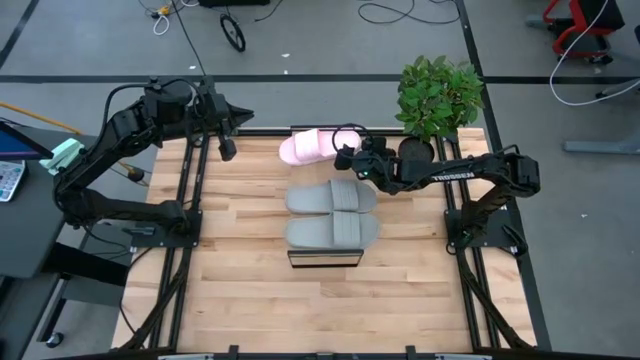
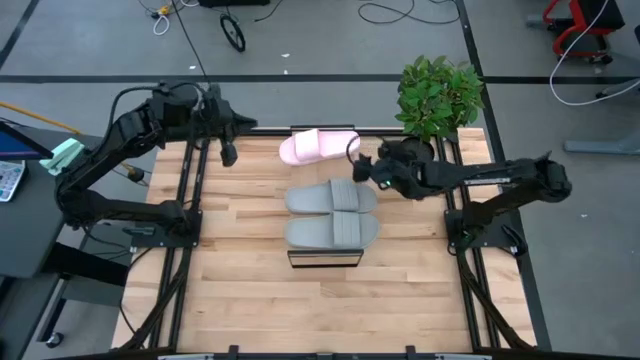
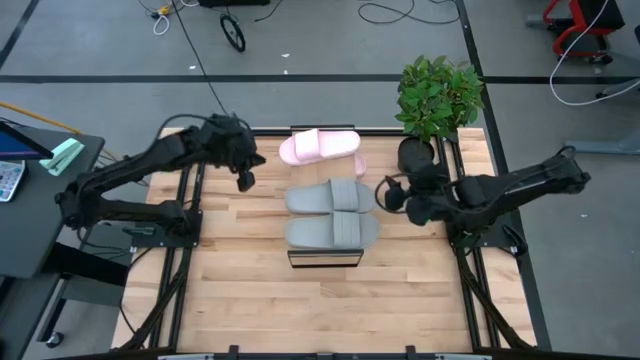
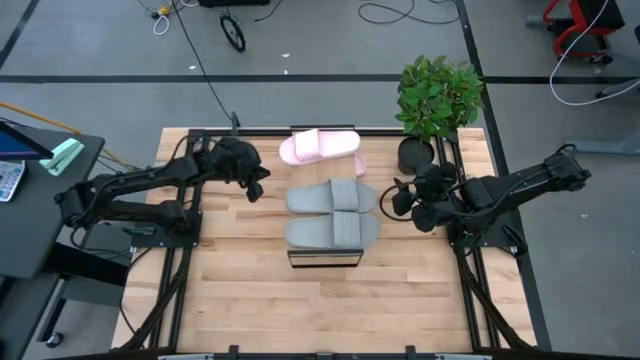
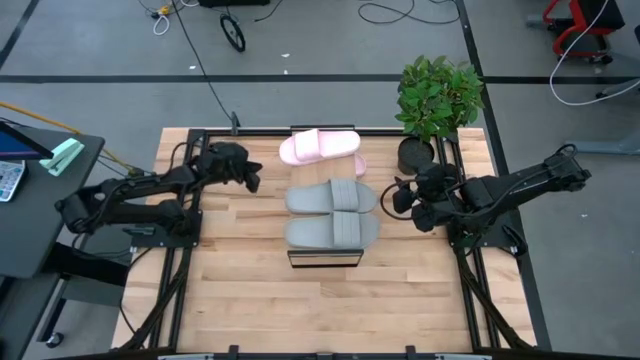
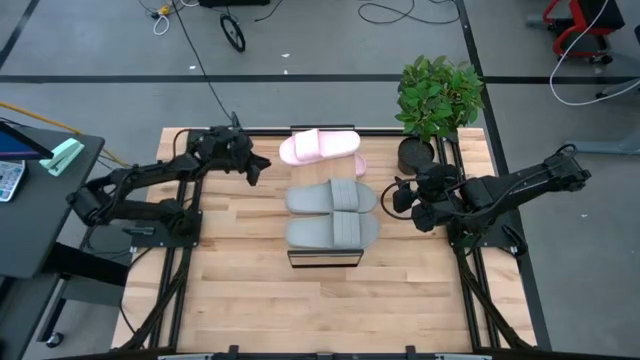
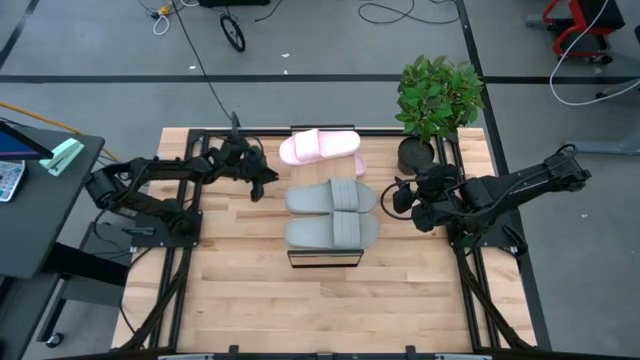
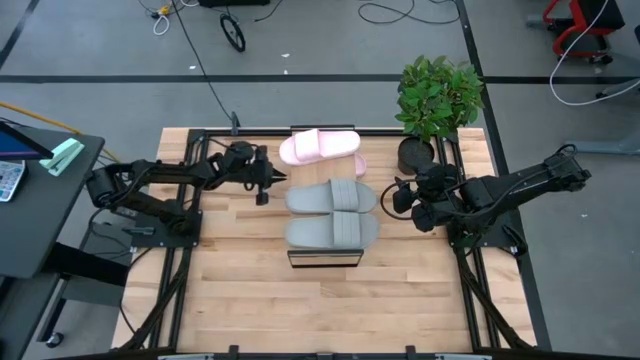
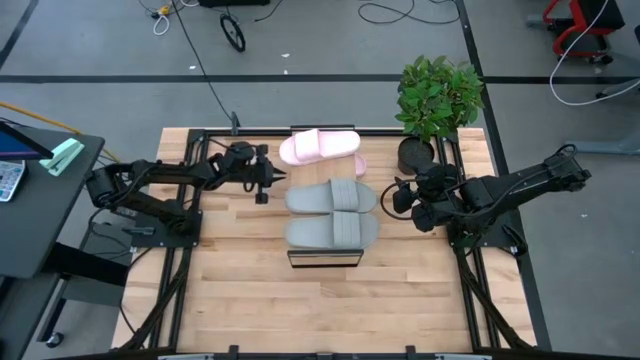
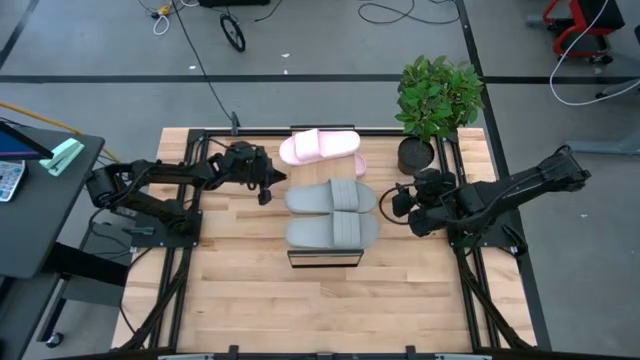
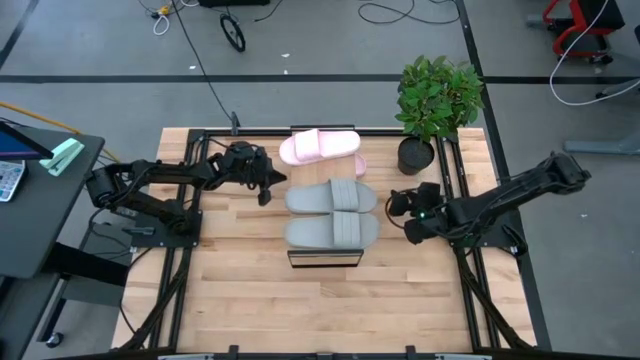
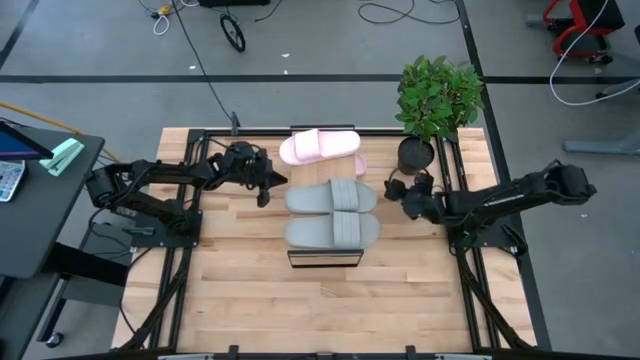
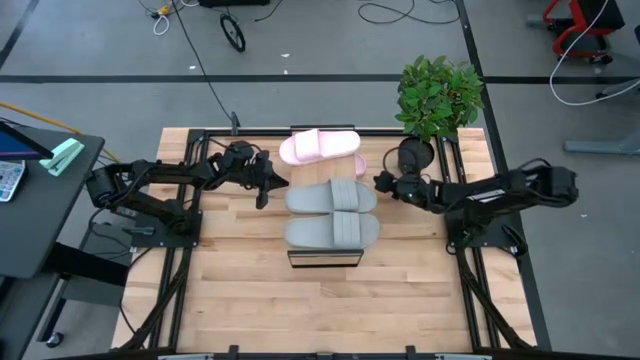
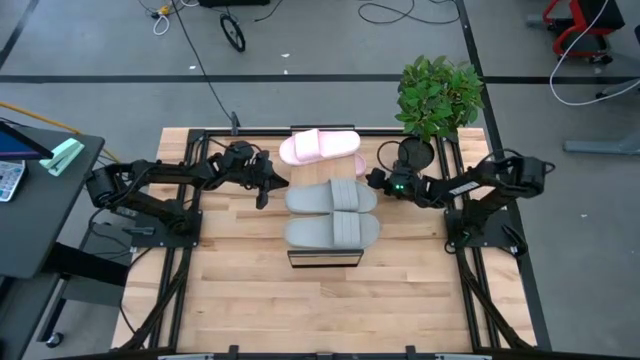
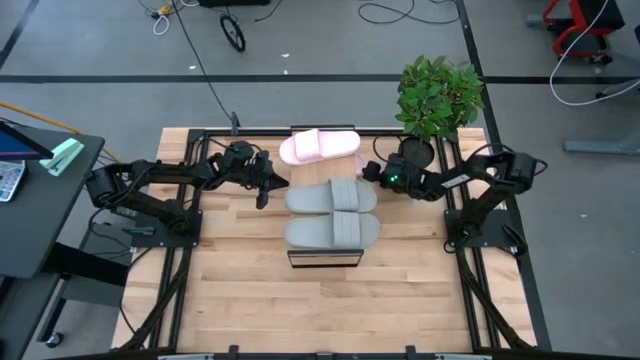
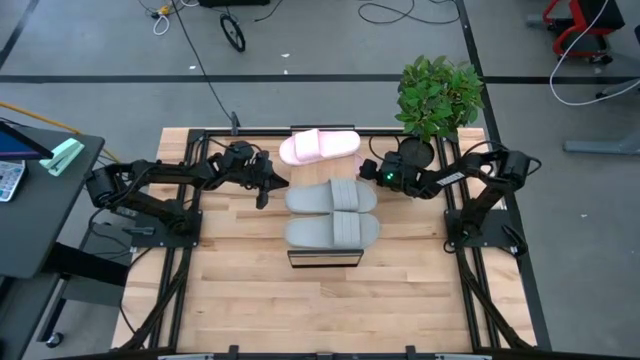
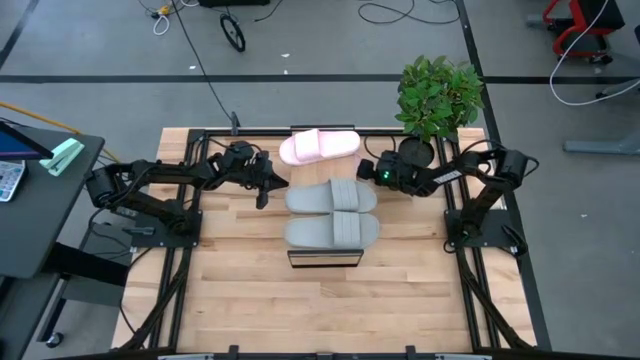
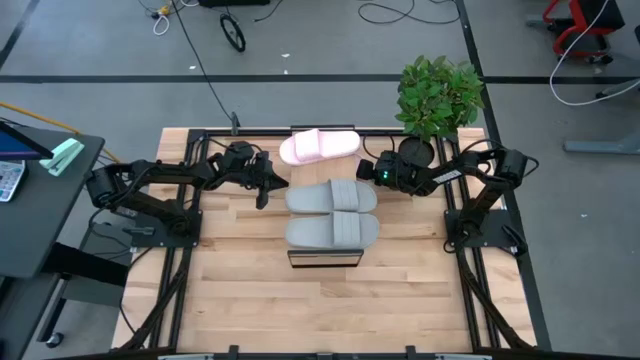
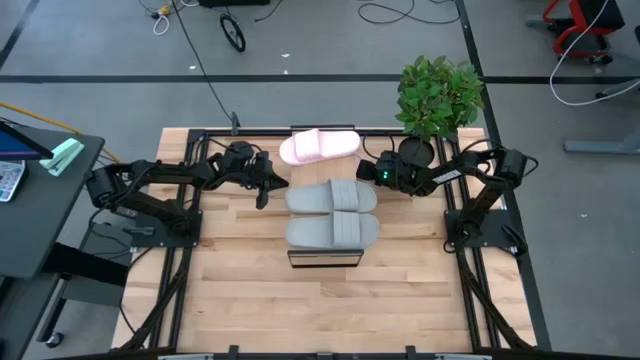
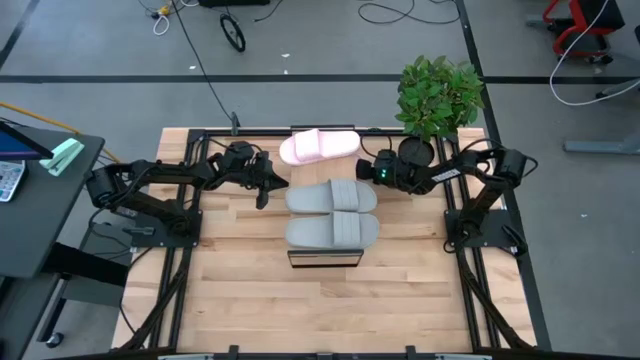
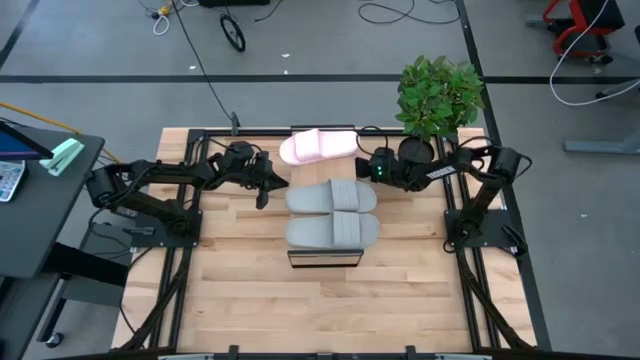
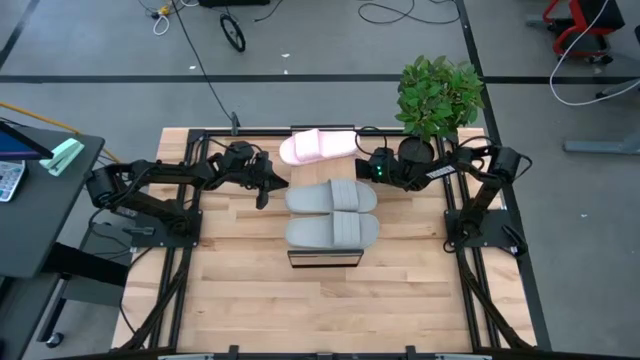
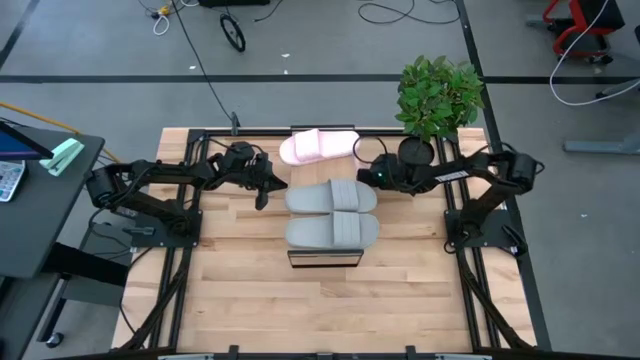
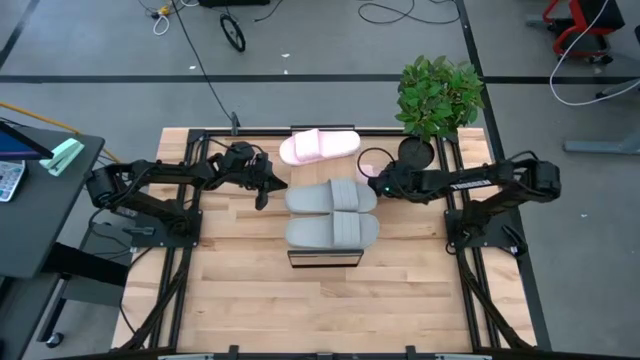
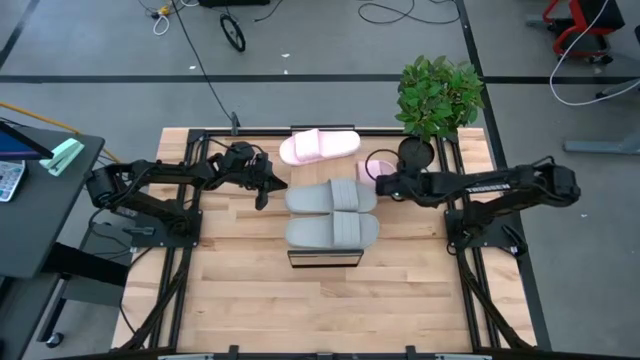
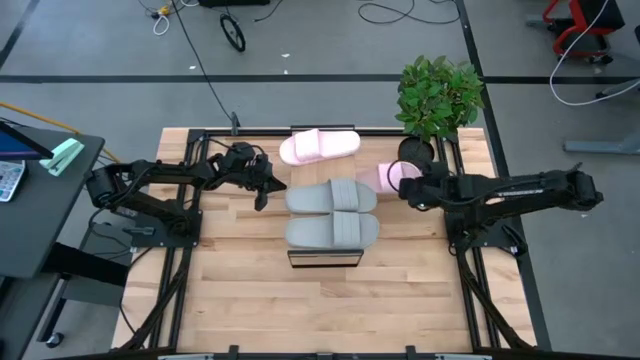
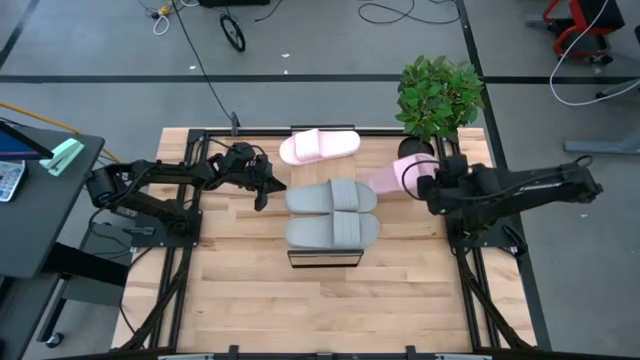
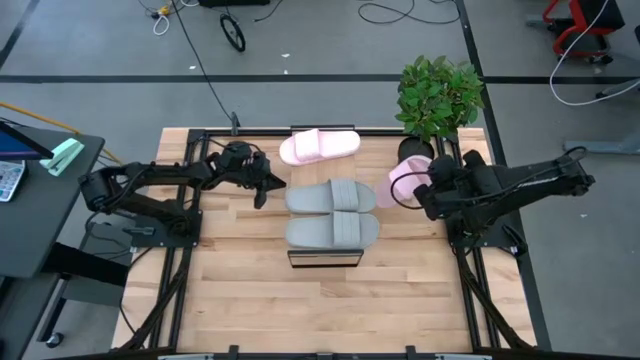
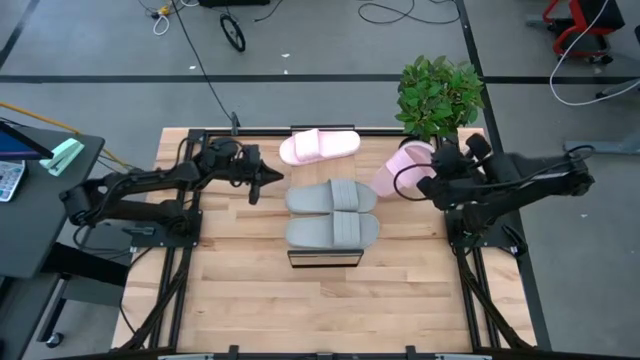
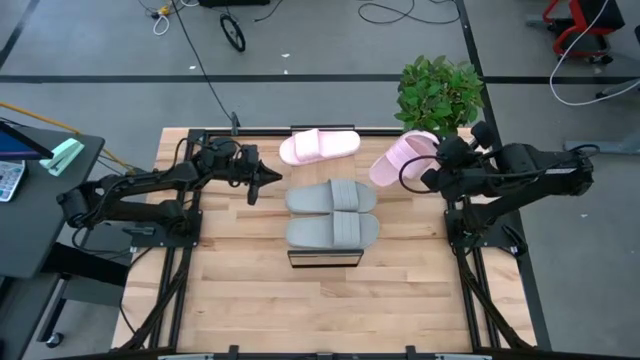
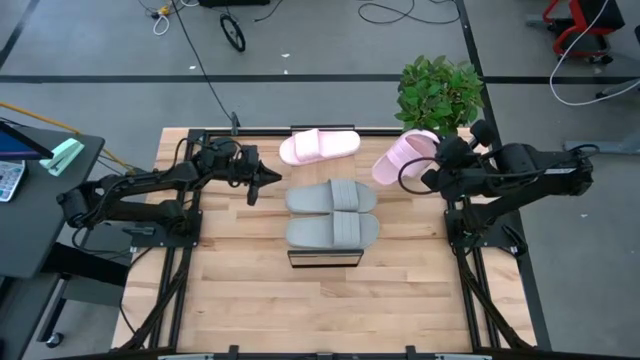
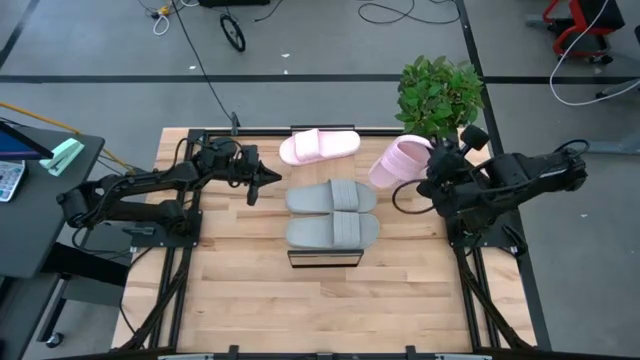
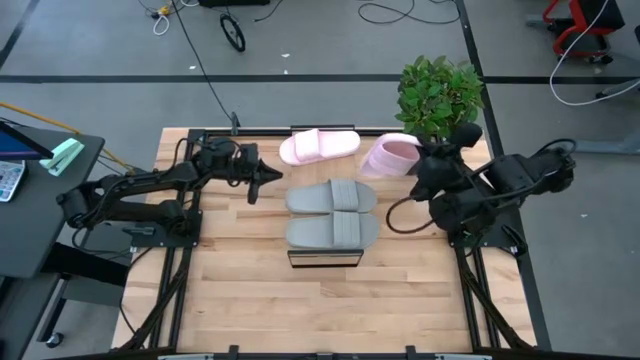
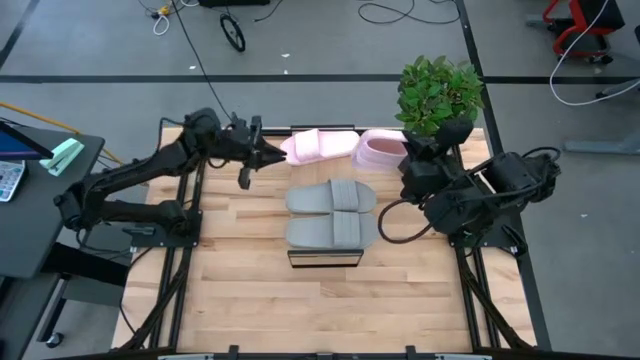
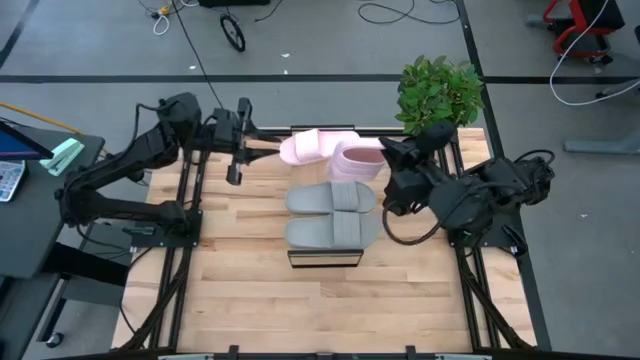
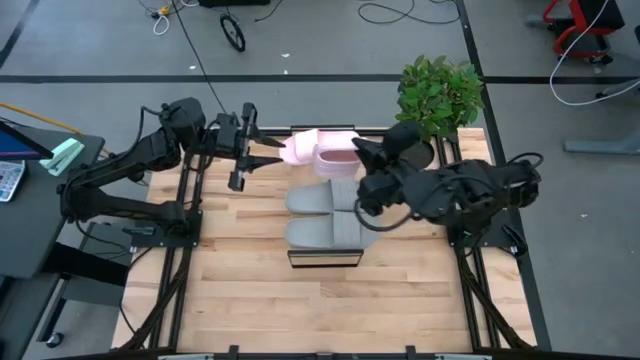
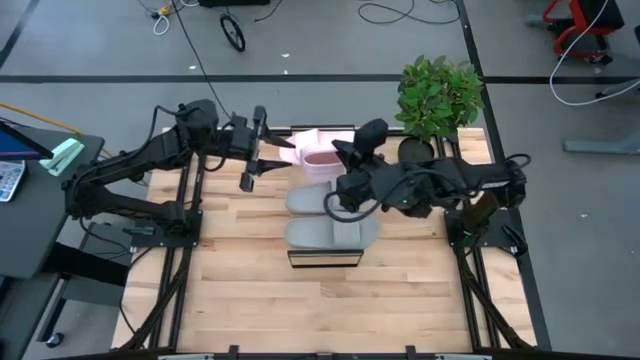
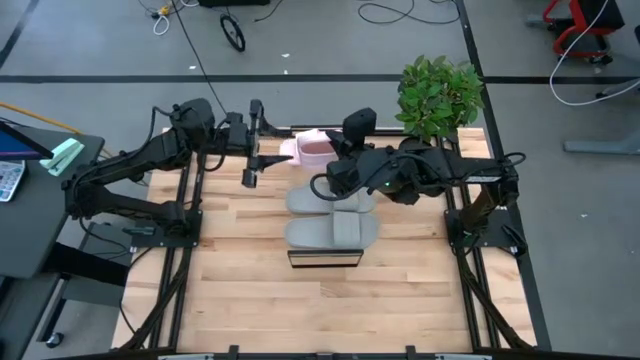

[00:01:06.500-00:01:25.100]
Task: Pick and place slides into the shelf
Put the pink slipper on the shelf

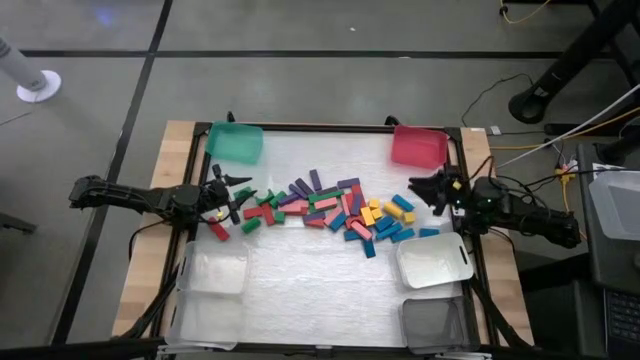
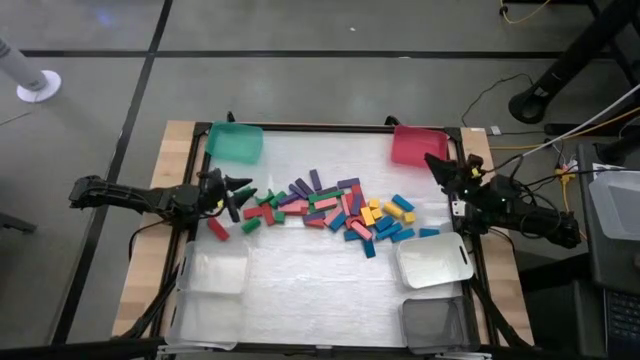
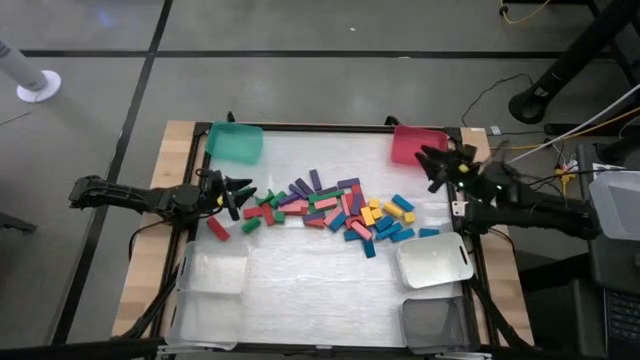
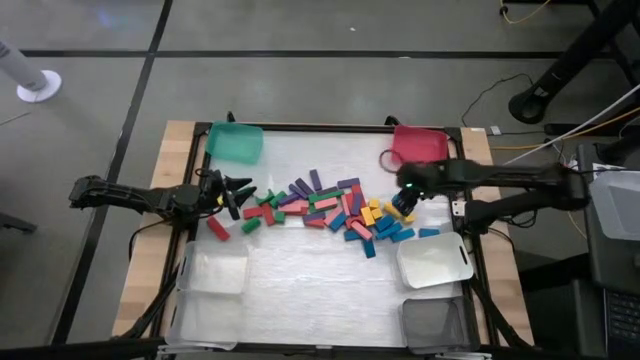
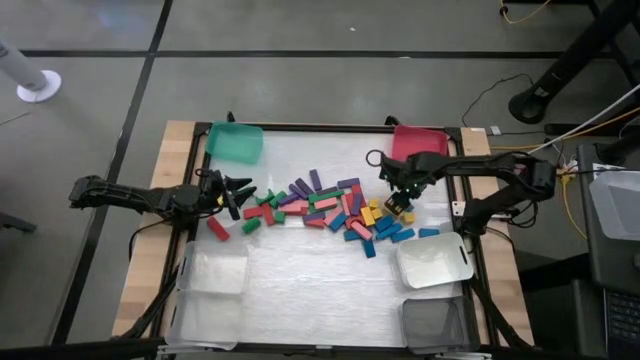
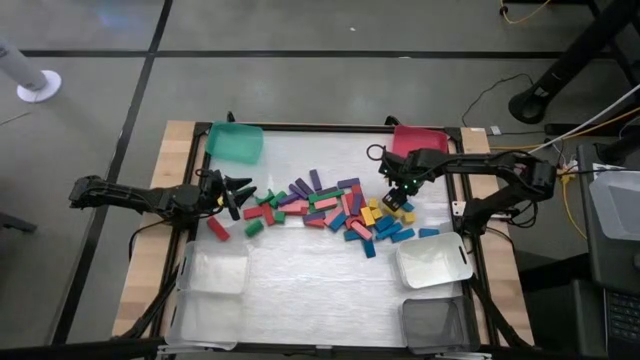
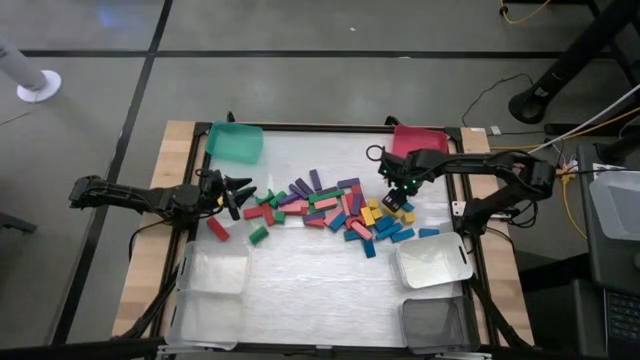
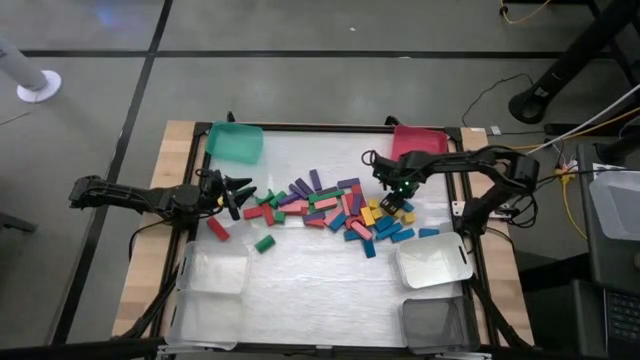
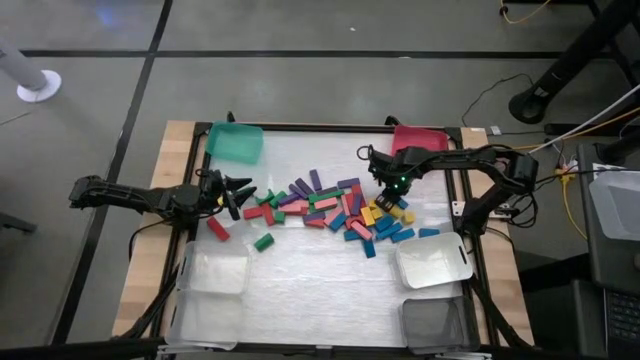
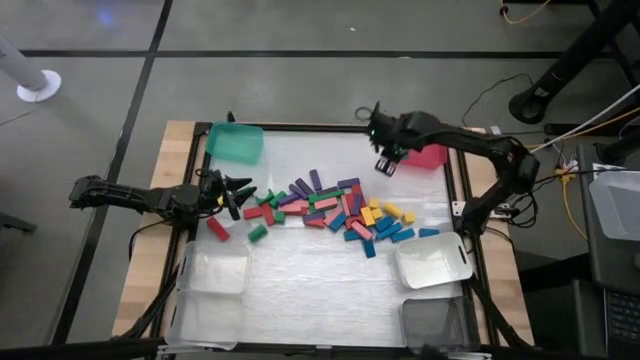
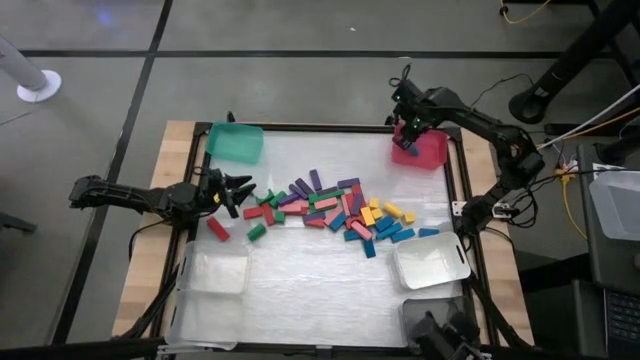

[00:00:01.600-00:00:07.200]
Task: Sort blocks
Put the blue block into the pink bin
